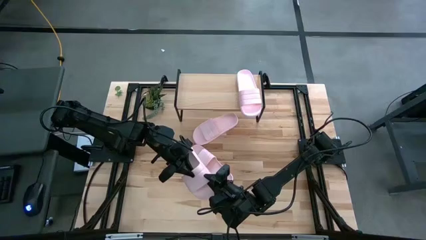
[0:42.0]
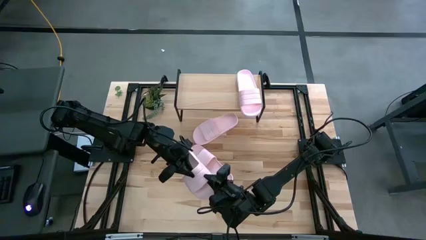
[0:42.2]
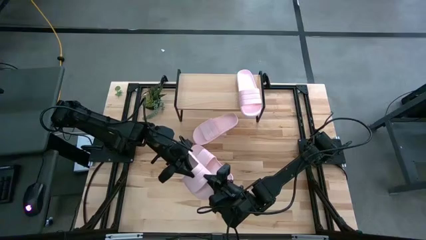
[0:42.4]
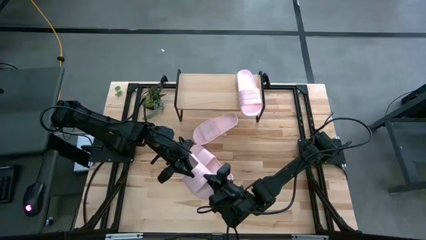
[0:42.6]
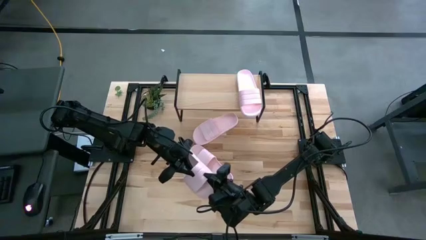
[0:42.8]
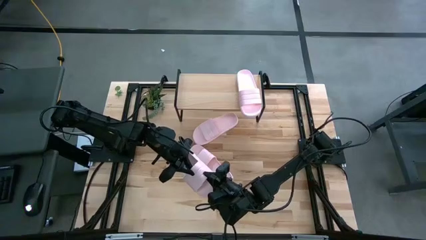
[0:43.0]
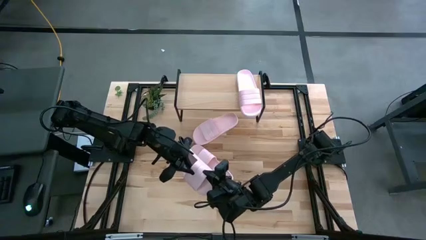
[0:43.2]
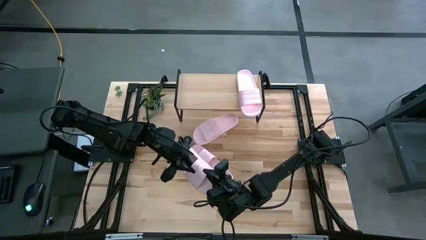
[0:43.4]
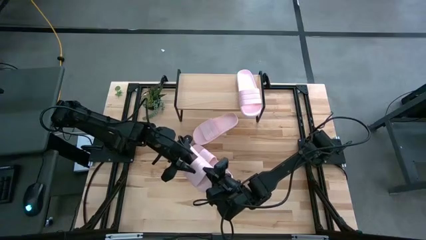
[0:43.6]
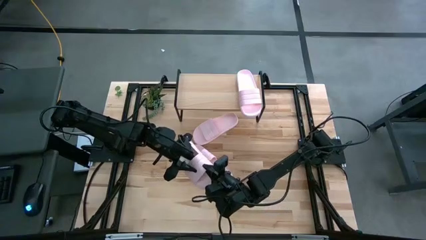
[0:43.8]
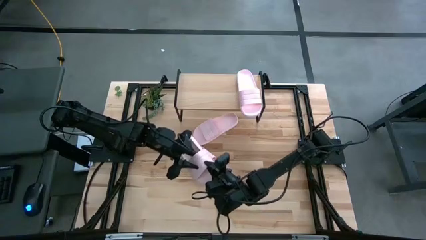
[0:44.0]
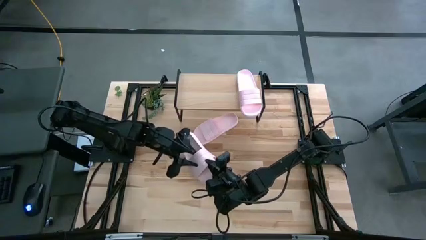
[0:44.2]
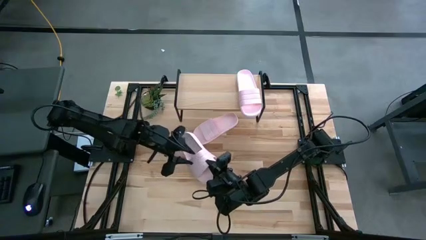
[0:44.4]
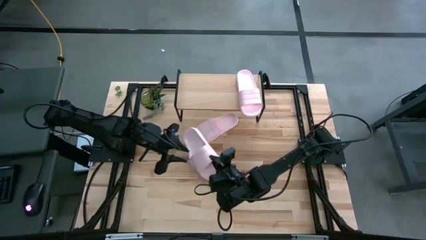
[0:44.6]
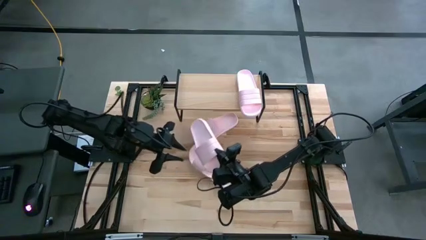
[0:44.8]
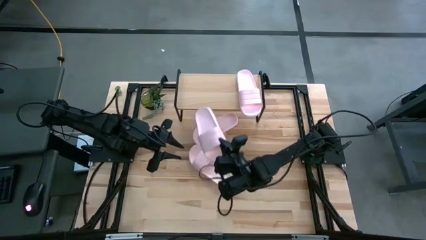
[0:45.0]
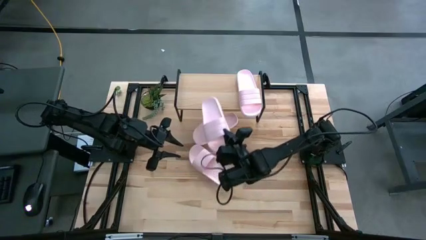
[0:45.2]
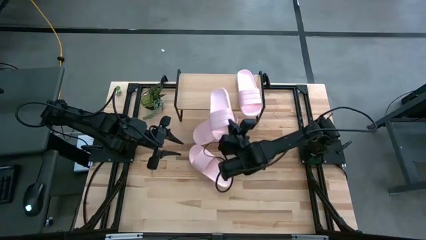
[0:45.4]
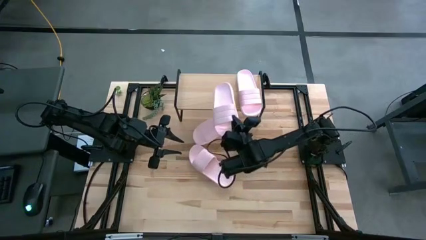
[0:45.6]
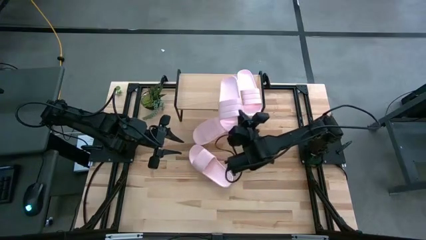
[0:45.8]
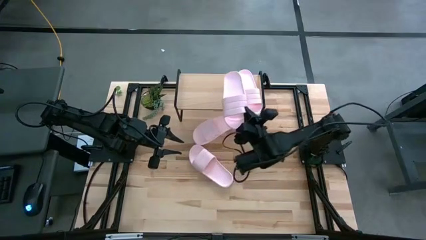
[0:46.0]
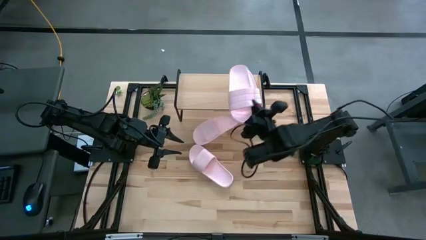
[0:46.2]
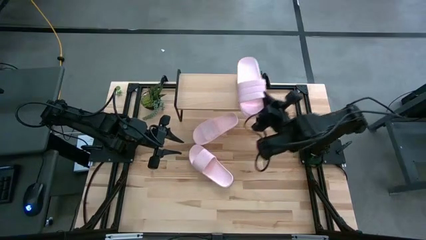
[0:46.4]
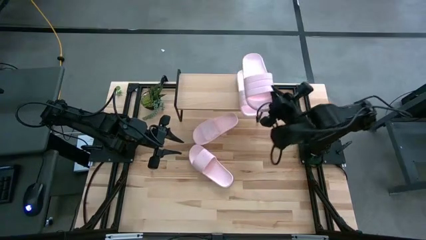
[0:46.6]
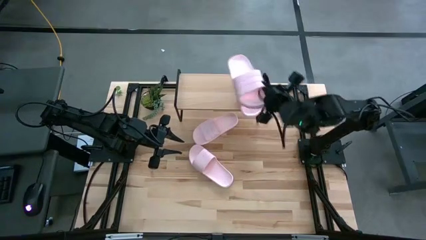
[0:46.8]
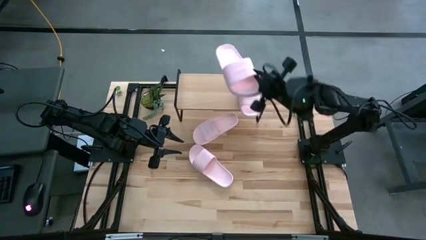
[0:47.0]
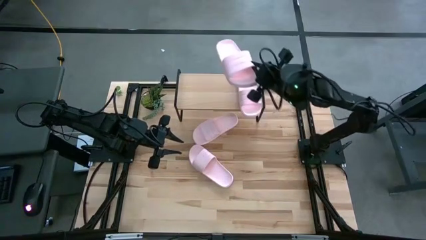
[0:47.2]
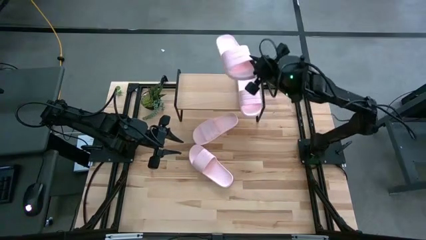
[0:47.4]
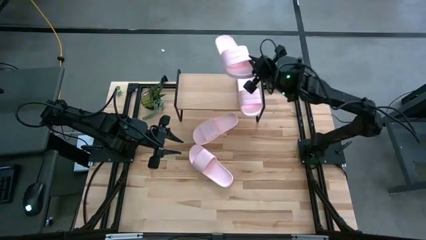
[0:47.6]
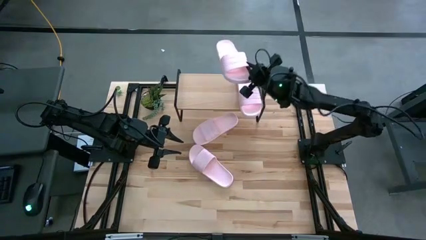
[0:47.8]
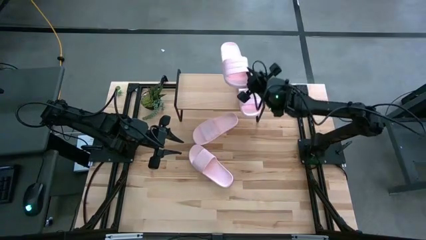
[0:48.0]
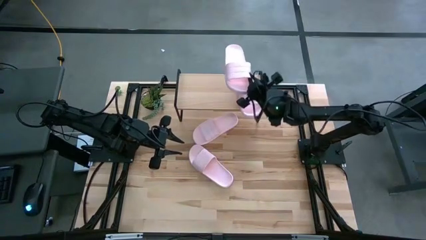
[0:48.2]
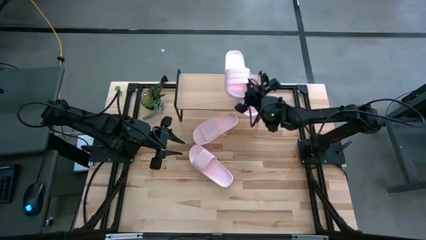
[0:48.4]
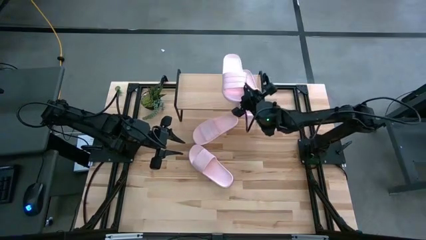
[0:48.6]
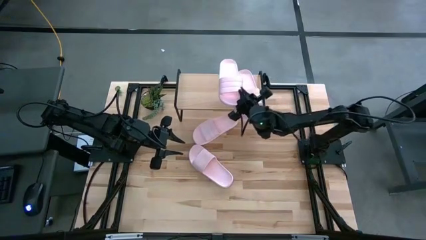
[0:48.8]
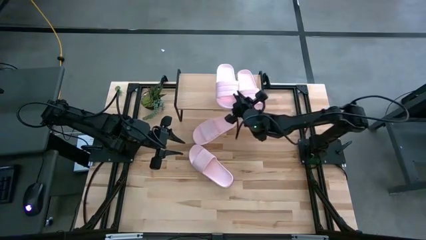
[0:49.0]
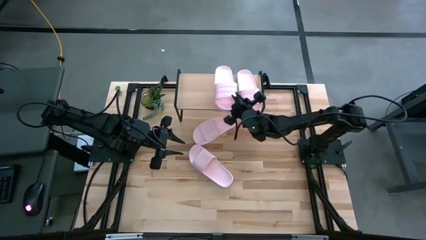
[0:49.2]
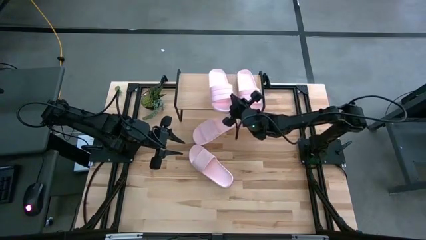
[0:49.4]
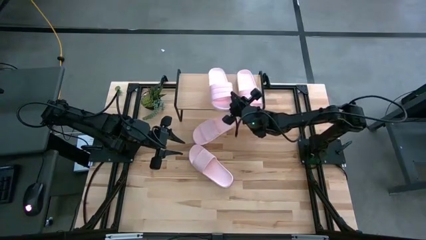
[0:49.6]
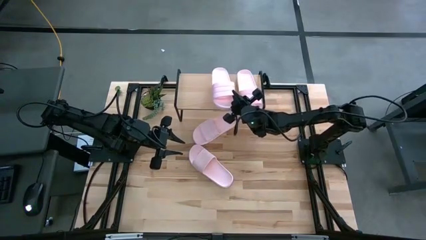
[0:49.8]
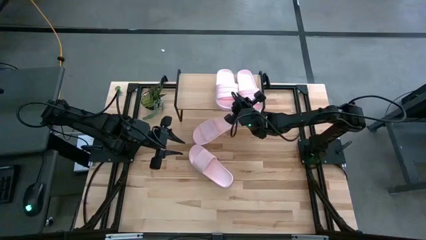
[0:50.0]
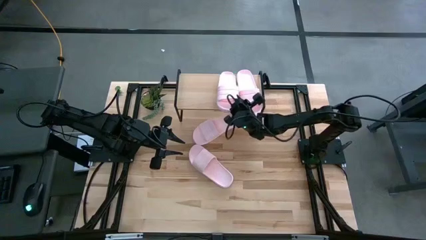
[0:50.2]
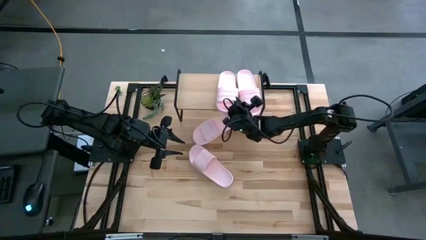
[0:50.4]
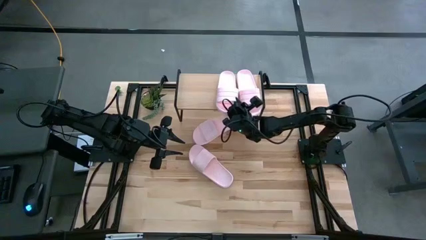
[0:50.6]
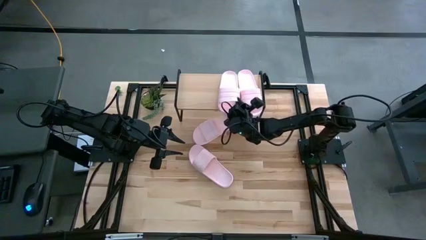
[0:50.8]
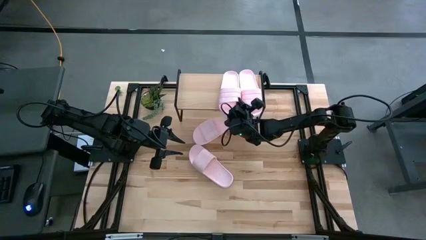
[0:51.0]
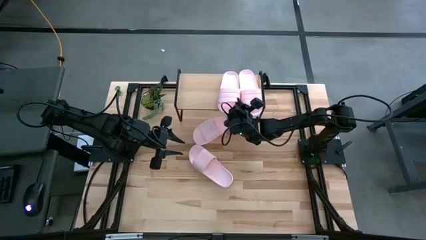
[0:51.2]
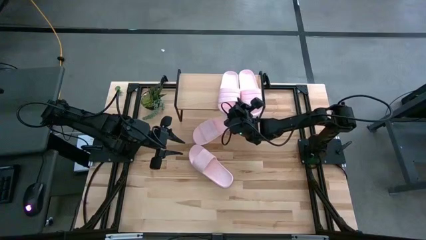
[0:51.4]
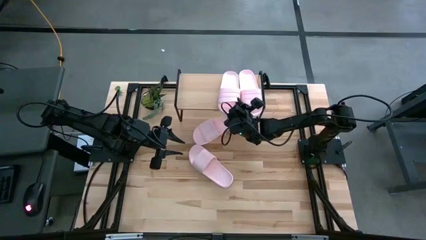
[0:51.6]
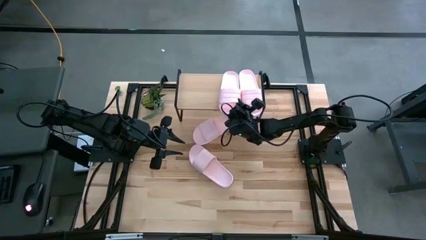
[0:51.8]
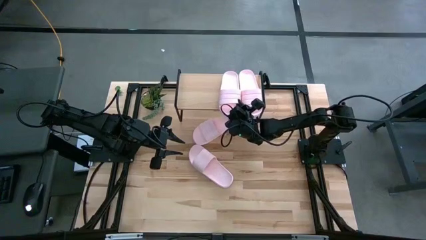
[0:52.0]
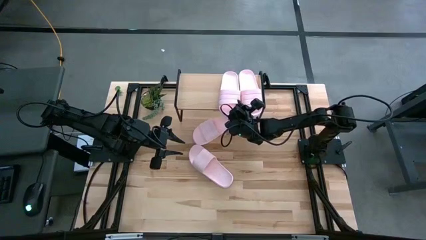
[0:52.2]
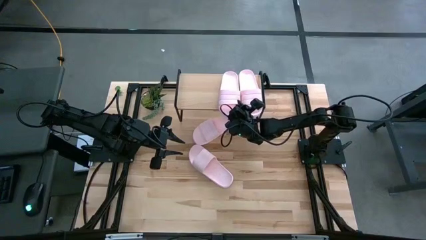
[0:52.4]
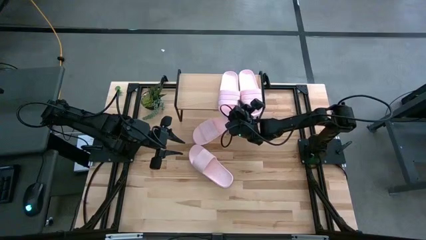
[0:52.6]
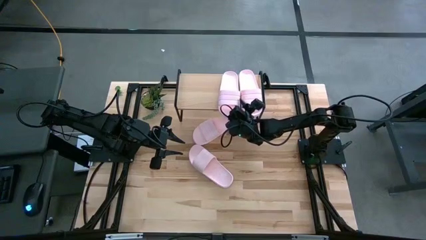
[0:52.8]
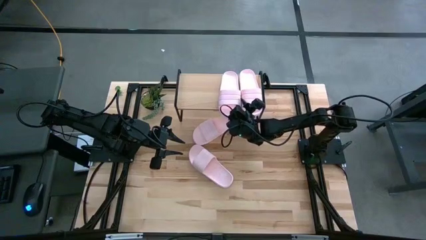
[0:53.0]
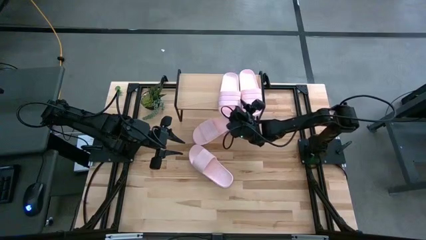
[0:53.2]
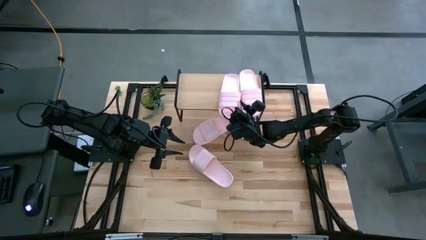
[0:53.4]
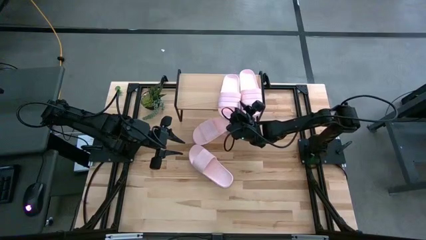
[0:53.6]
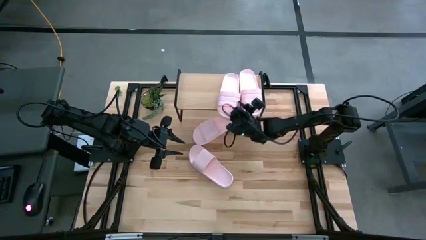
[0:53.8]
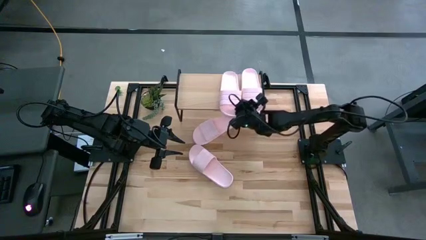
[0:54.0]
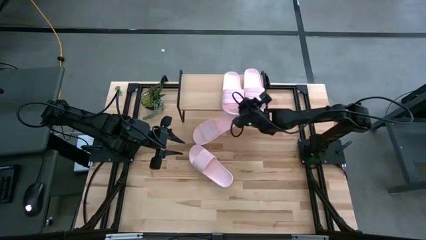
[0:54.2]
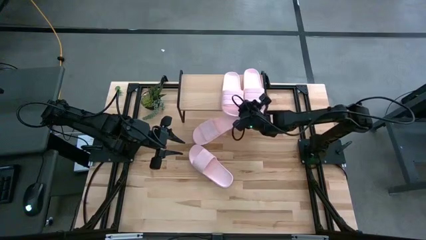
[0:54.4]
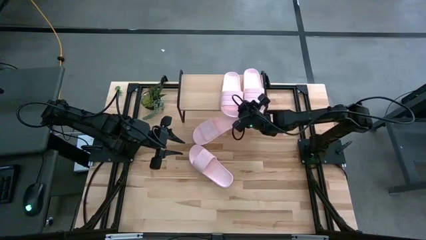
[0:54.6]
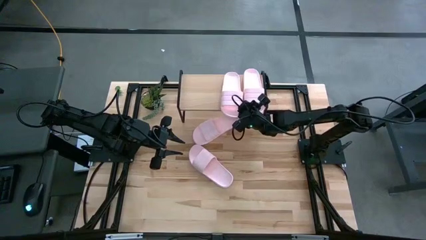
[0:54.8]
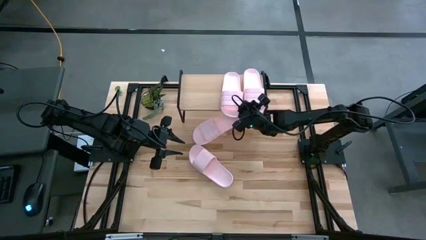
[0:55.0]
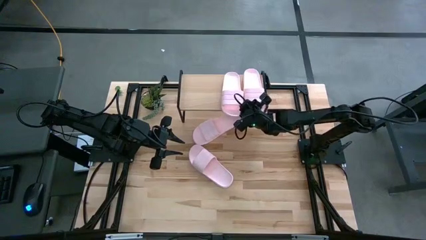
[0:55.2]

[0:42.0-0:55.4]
Task: Pick and place slides into the shelf
Put the pink slide on the shelf
